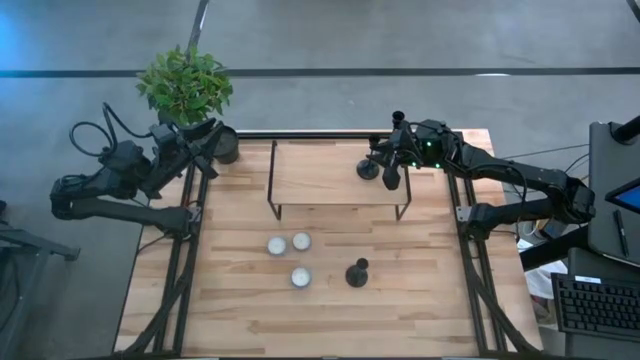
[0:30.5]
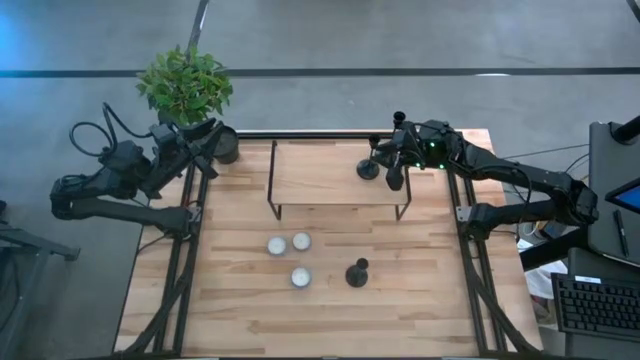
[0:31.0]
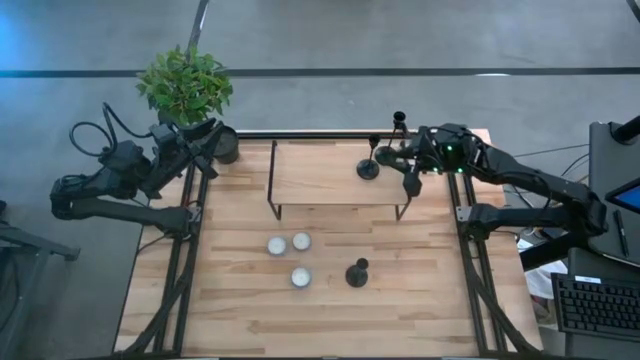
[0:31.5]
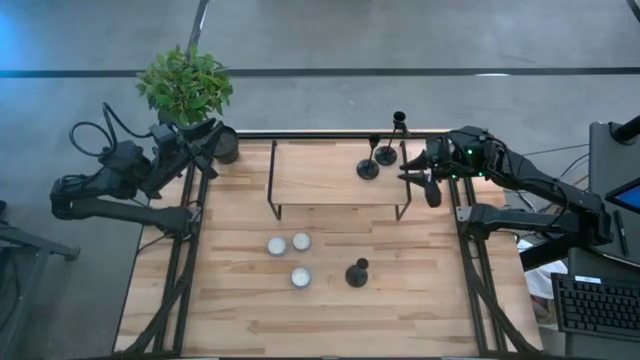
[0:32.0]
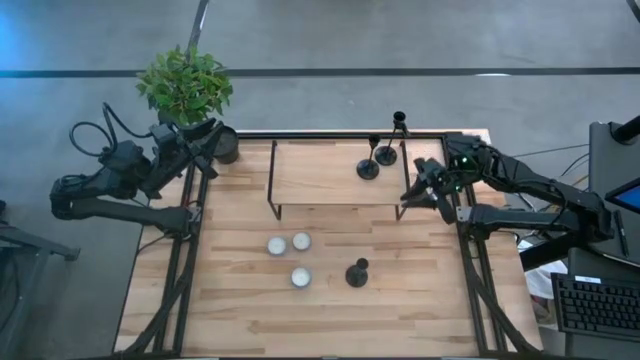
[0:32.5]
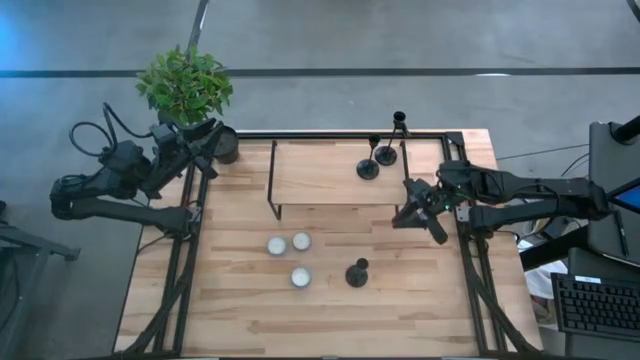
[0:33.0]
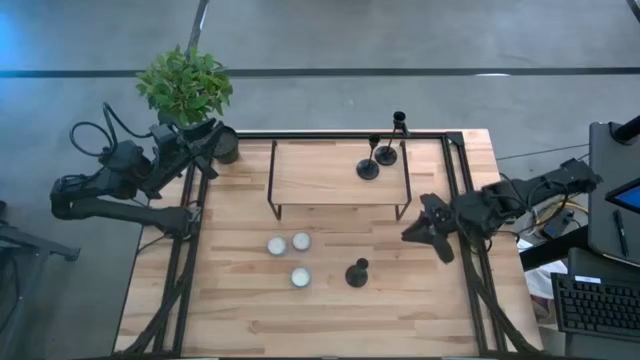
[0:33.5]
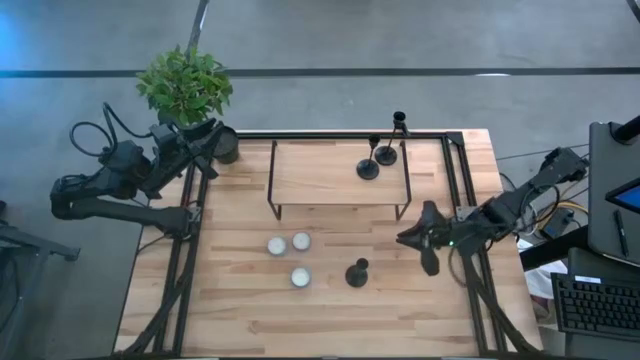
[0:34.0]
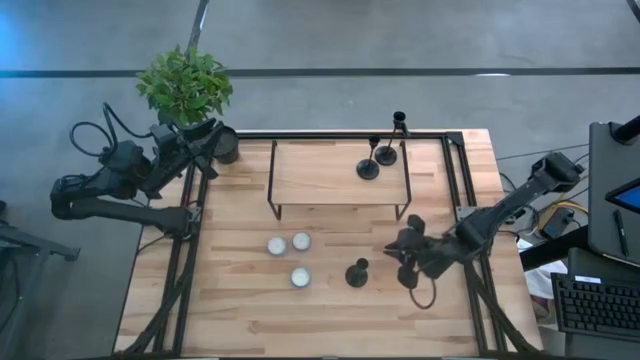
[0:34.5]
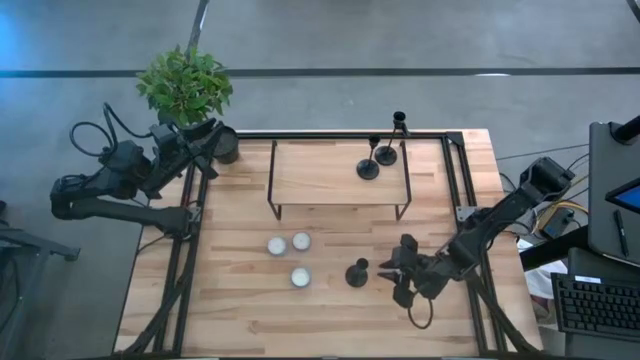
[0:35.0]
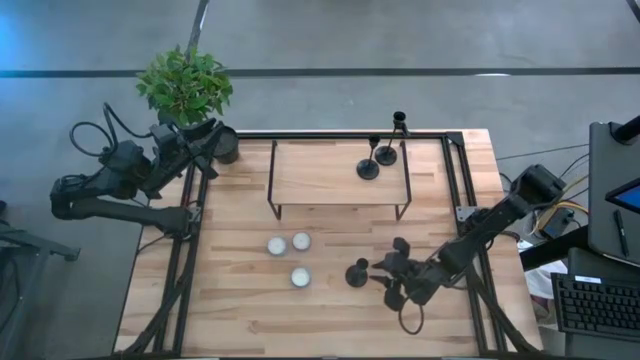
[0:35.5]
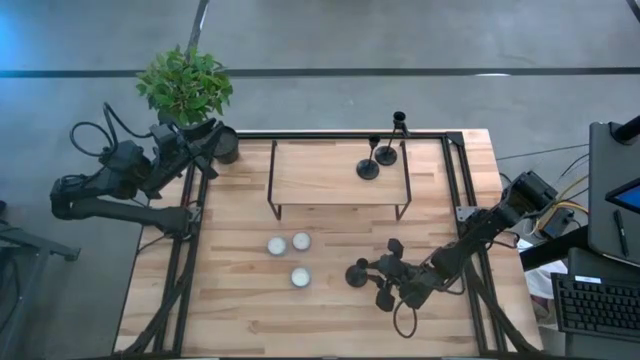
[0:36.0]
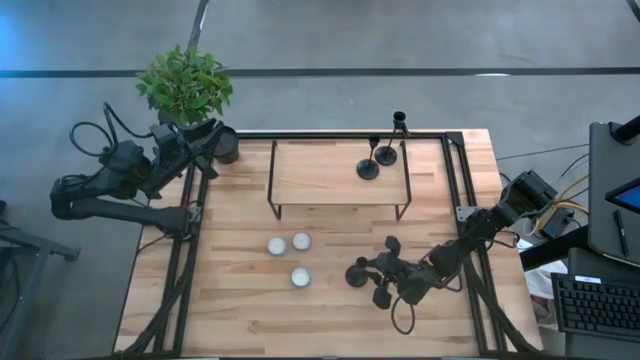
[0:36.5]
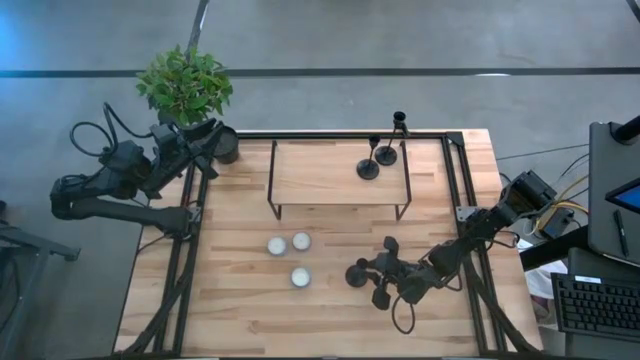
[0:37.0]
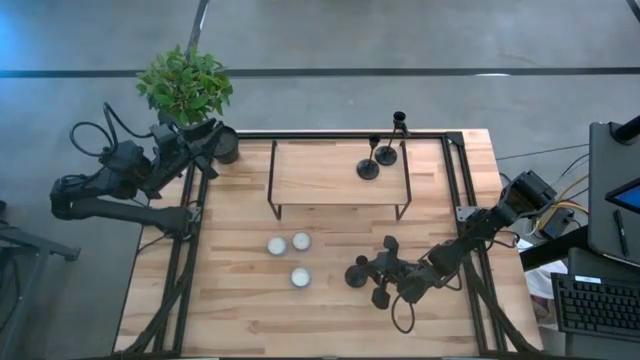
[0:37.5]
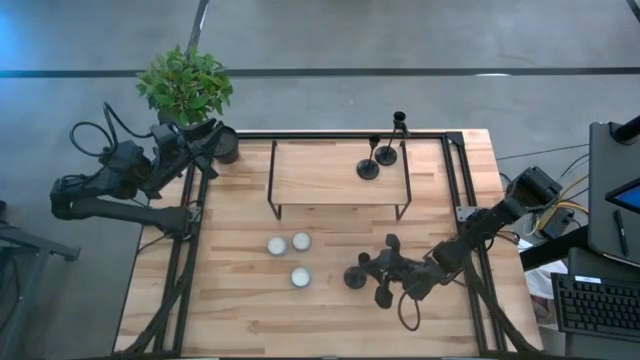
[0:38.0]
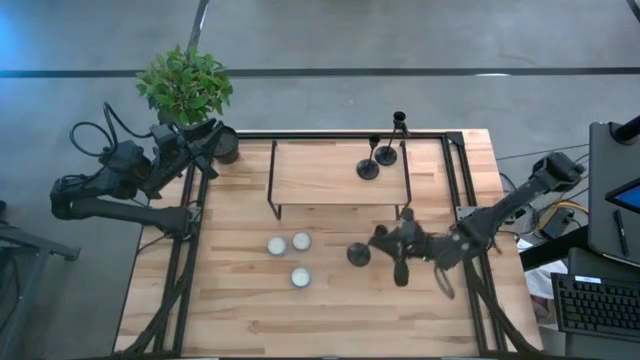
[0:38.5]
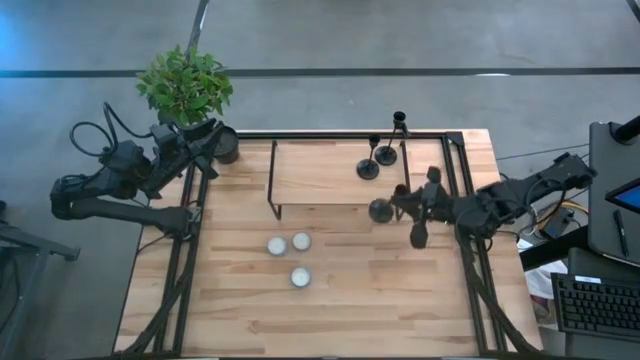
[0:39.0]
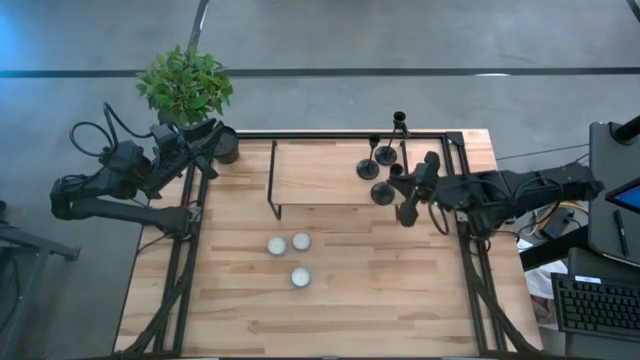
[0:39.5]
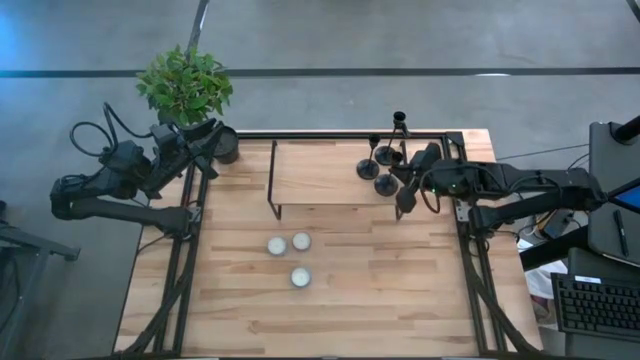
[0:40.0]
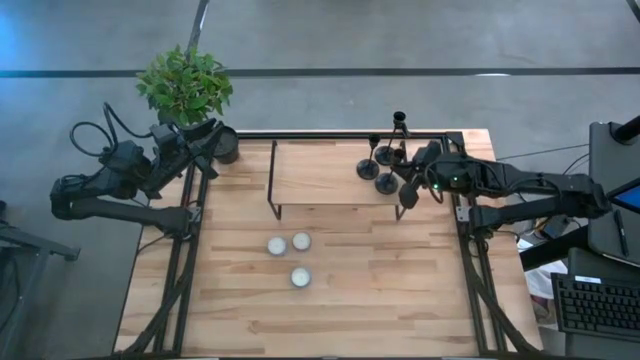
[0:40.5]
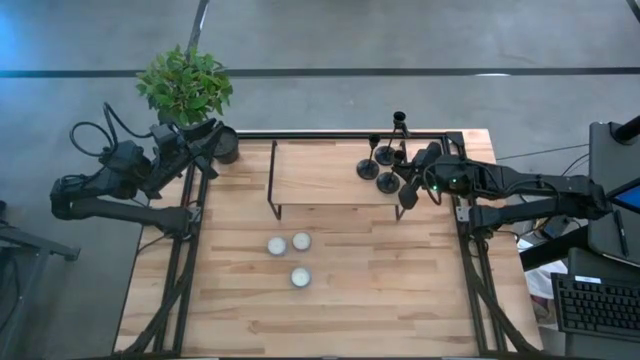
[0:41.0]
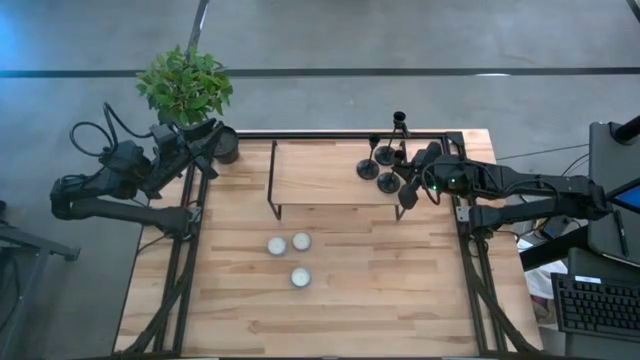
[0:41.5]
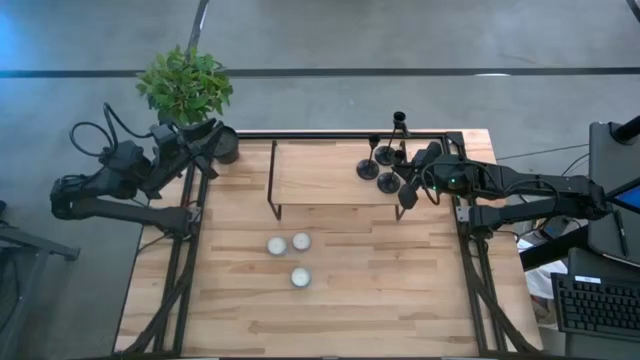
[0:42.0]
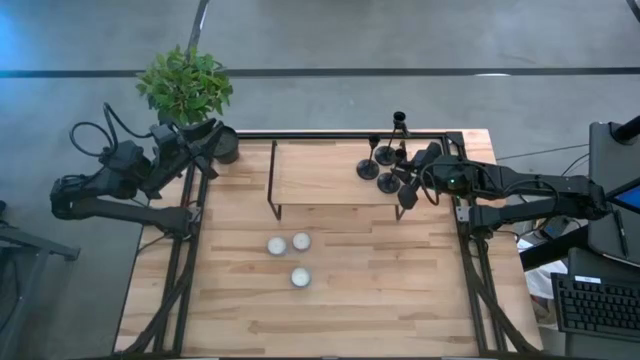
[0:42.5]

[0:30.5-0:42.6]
Task: Pick & Place candle stick holders
Put the black candle holder on the shelf

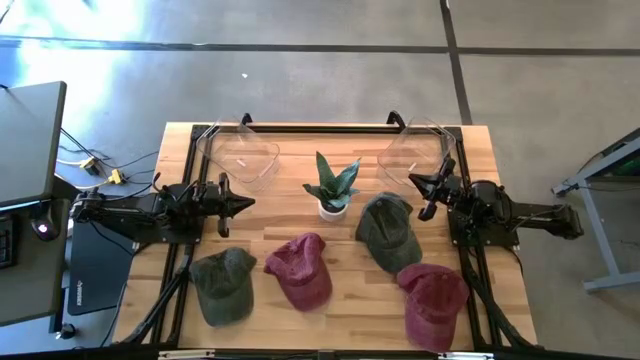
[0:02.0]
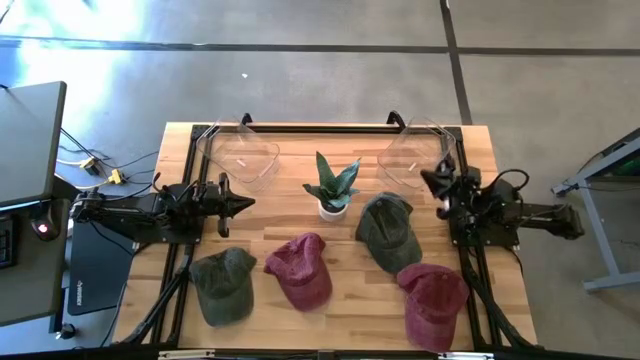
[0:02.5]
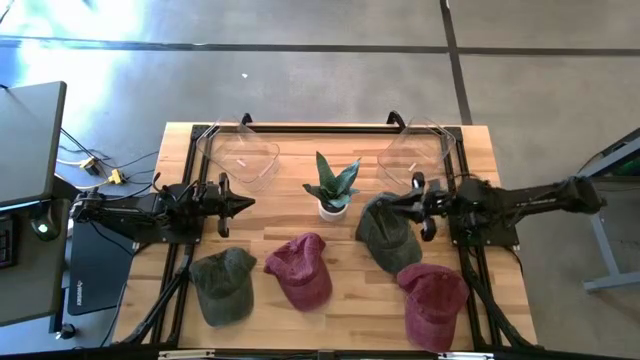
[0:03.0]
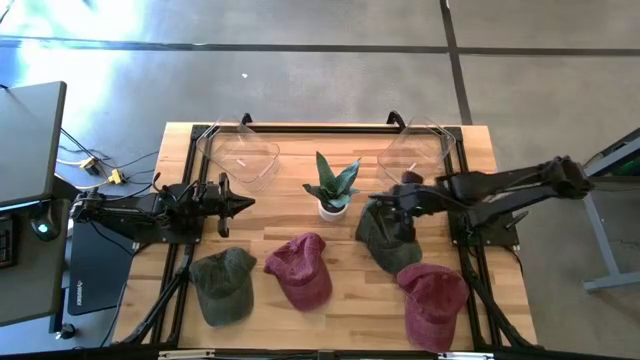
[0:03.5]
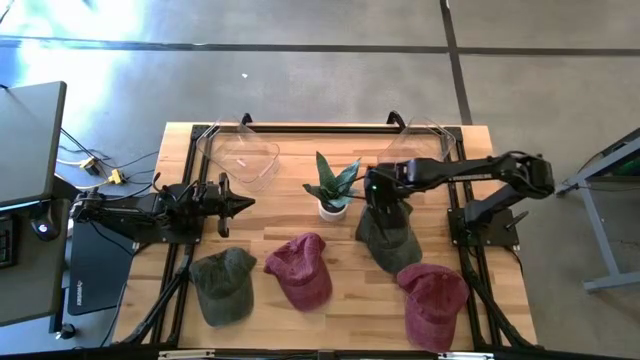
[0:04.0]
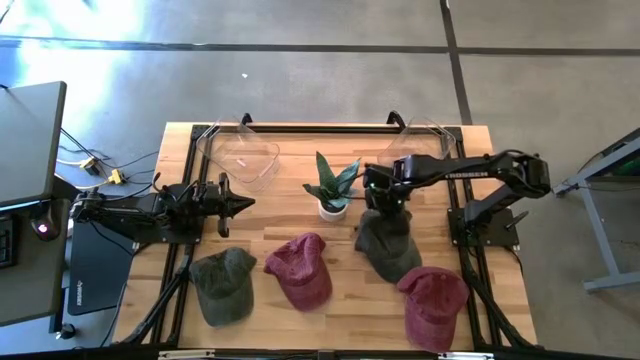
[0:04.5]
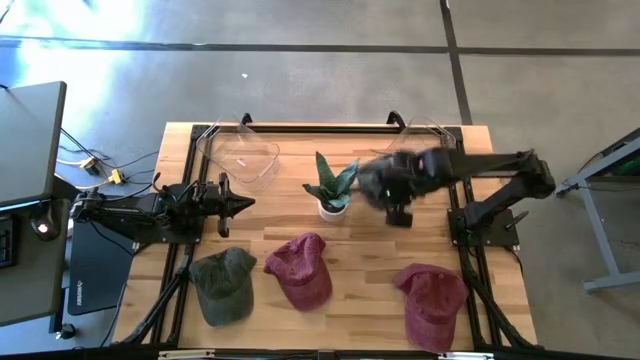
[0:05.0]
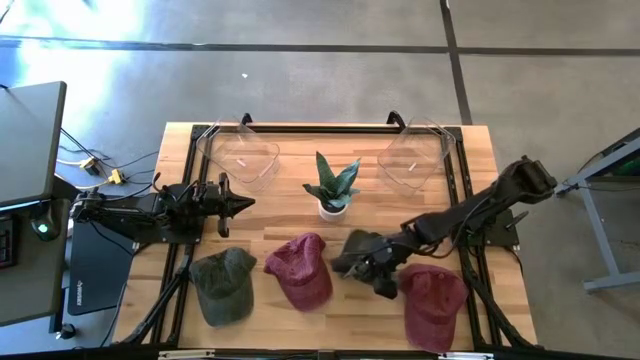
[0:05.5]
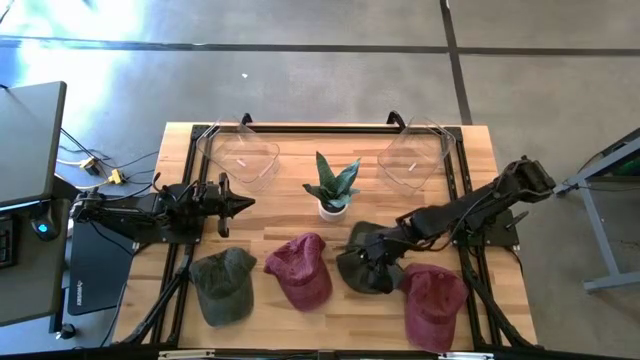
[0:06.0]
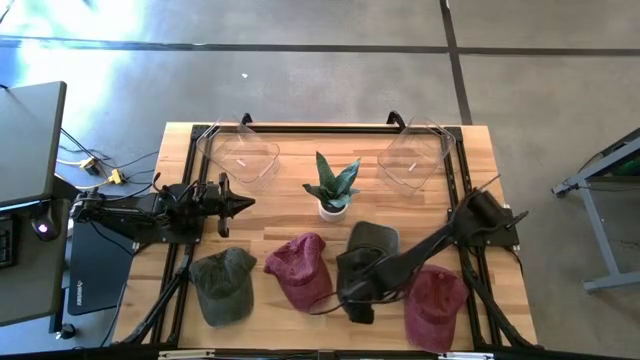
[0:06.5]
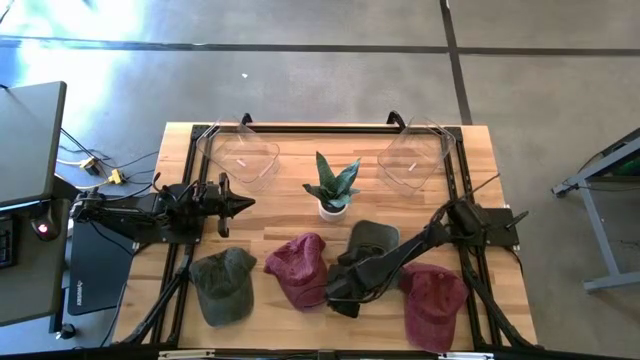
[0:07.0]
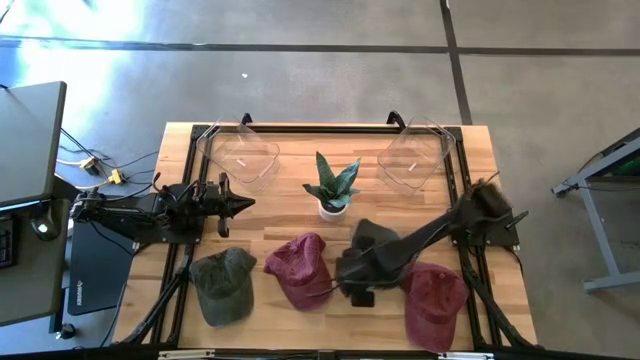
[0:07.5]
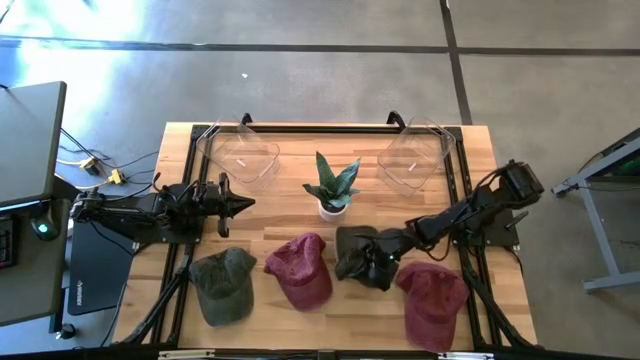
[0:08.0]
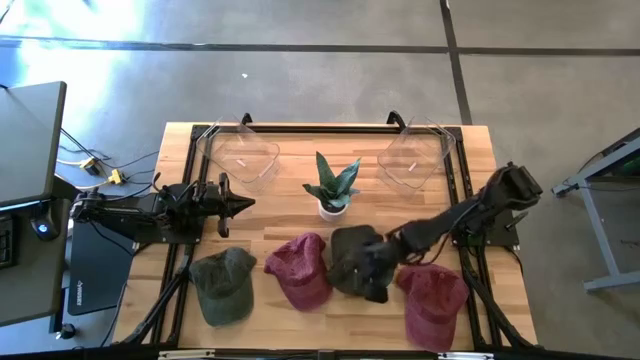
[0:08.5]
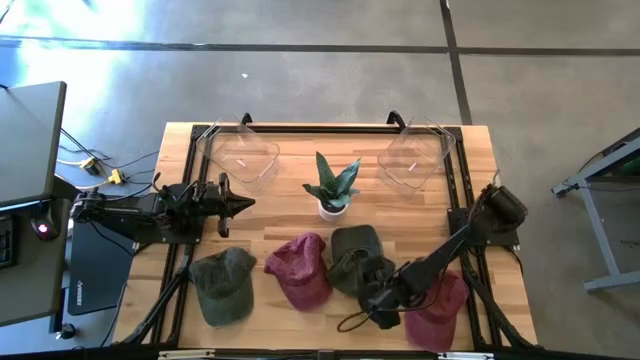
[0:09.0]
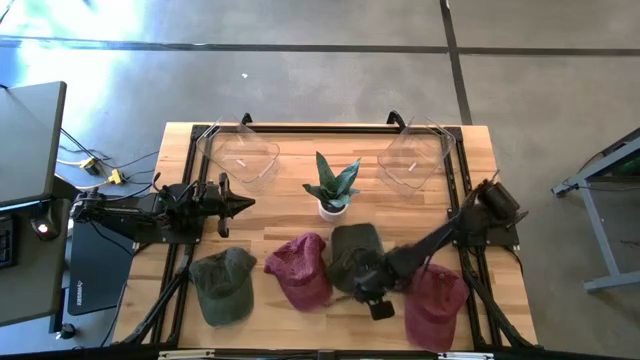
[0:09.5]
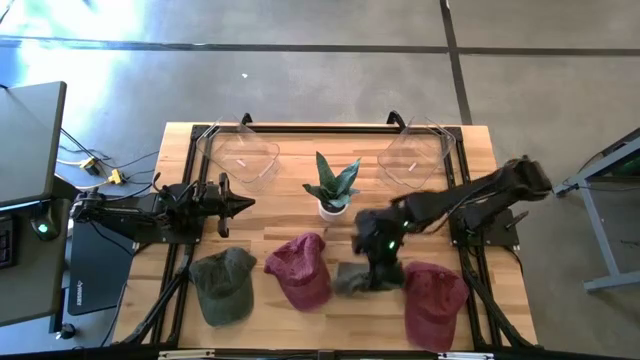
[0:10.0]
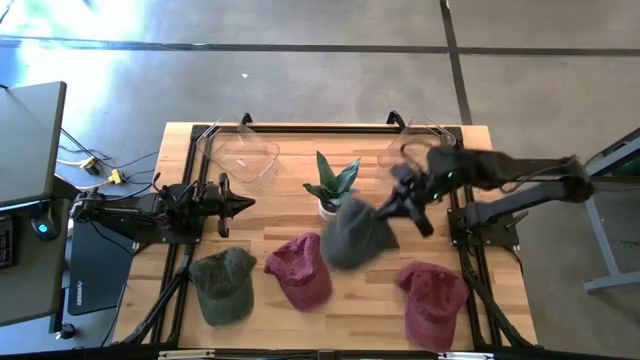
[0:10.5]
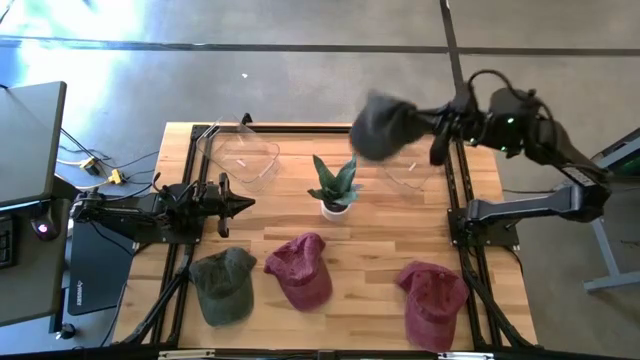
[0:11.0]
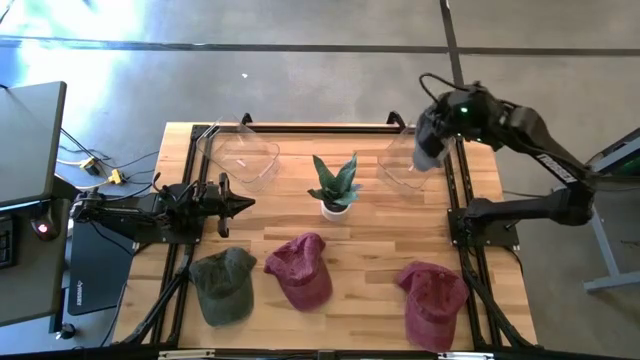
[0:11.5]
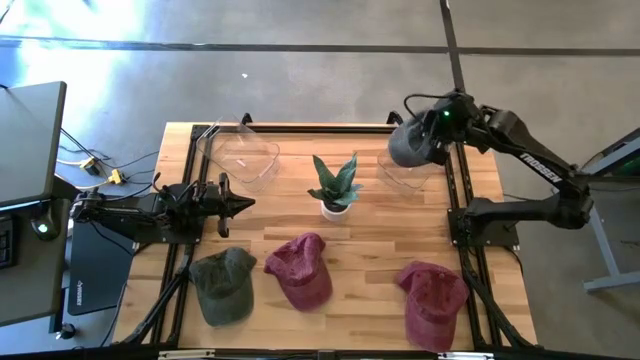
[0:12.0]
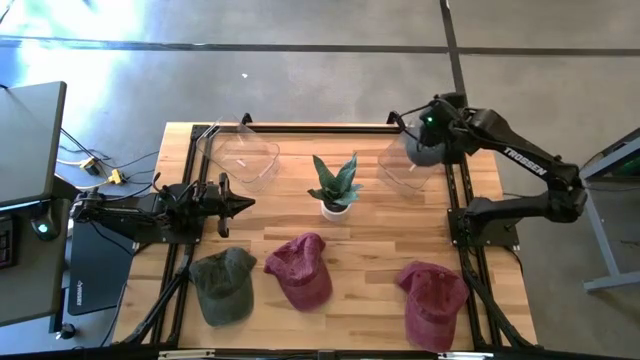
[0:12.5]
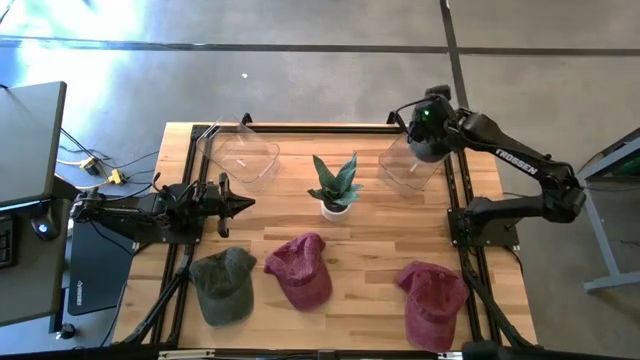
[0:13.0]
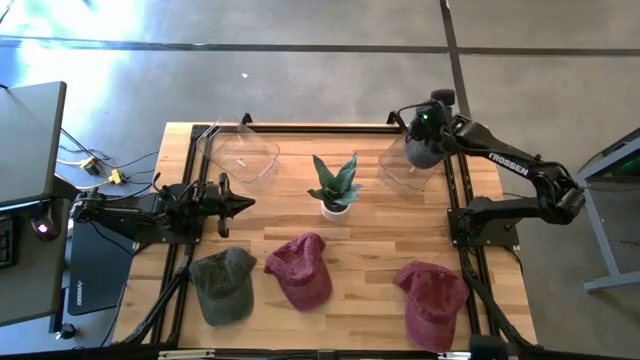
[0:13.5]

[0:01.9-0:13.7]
Task: Pick & Place hat
Put the right black cap into the right transparent bin
